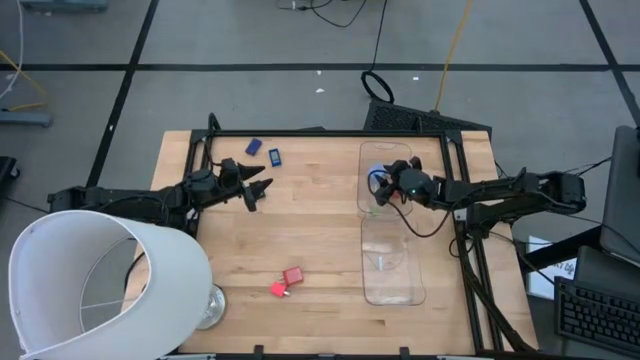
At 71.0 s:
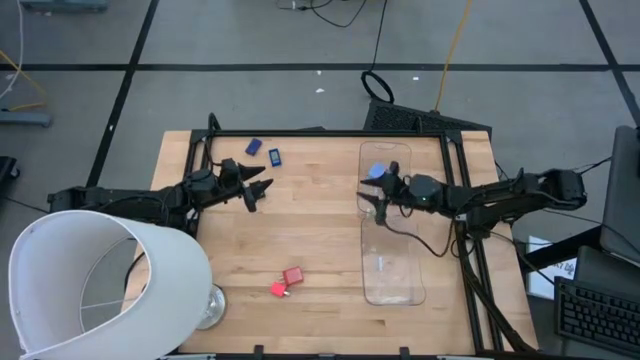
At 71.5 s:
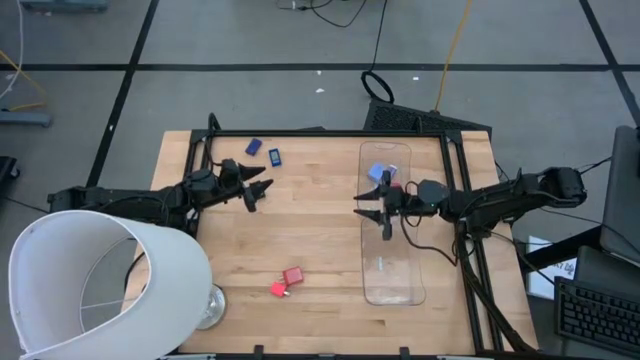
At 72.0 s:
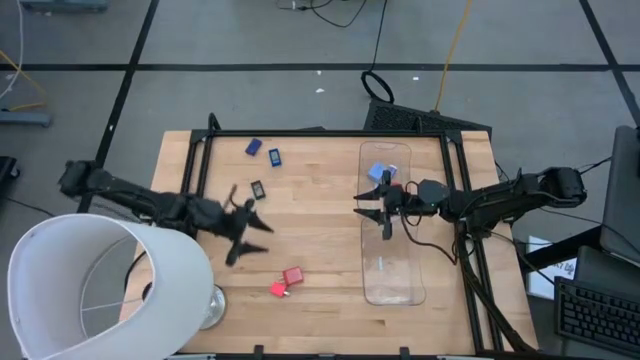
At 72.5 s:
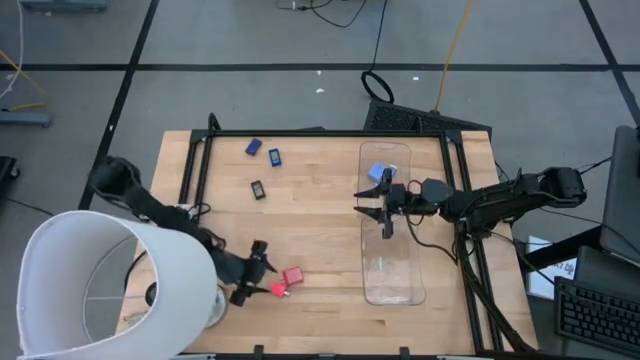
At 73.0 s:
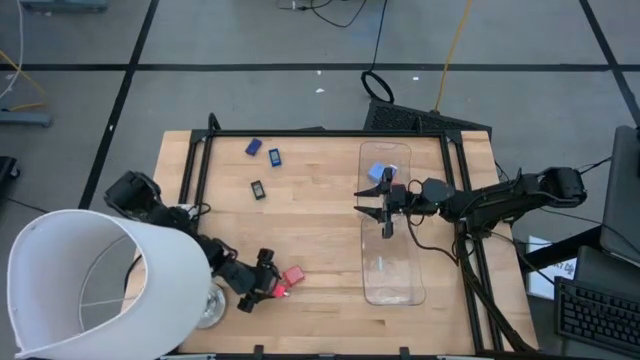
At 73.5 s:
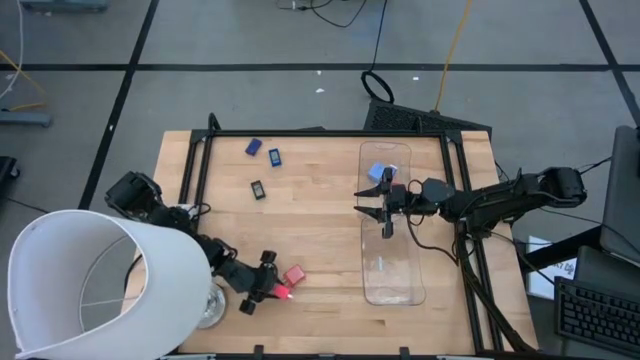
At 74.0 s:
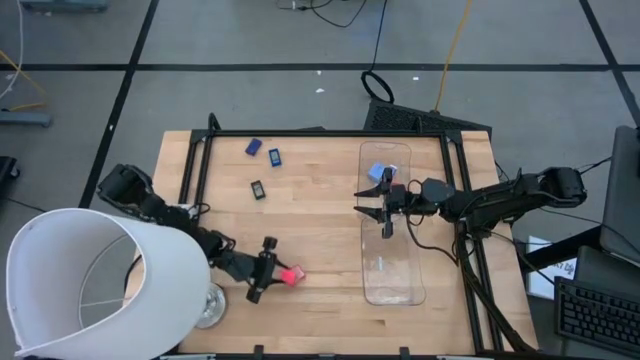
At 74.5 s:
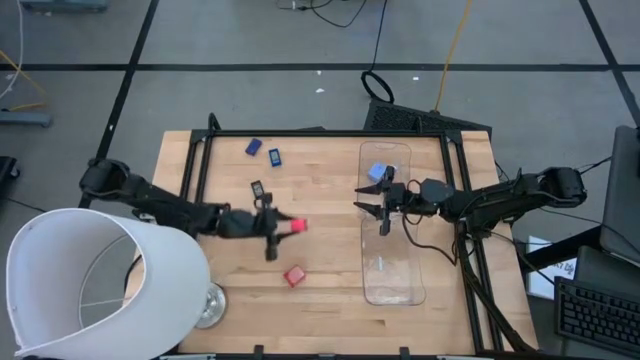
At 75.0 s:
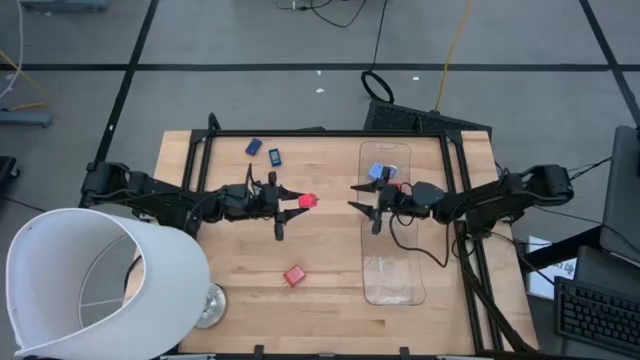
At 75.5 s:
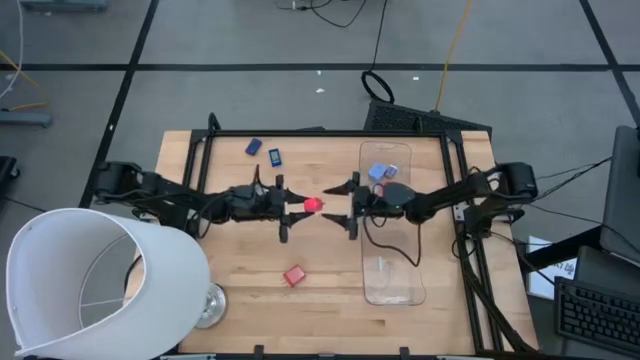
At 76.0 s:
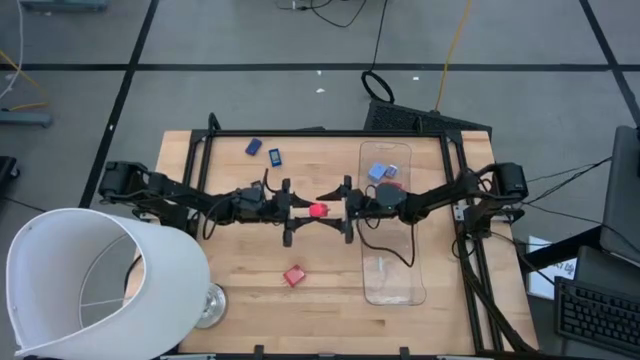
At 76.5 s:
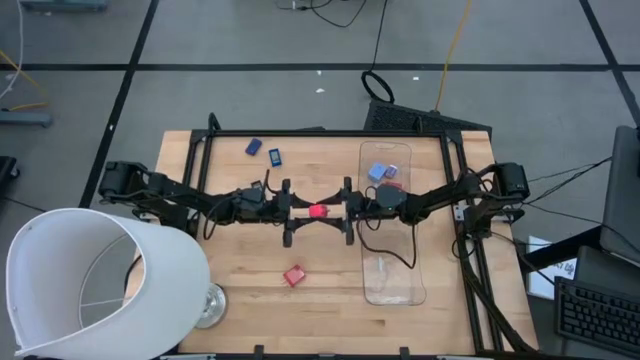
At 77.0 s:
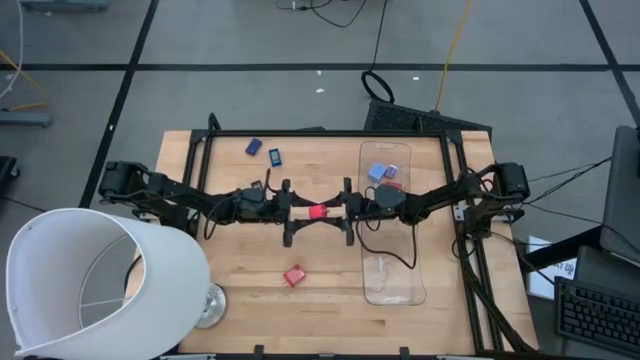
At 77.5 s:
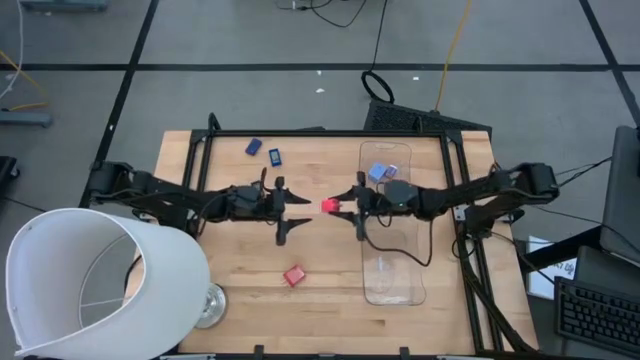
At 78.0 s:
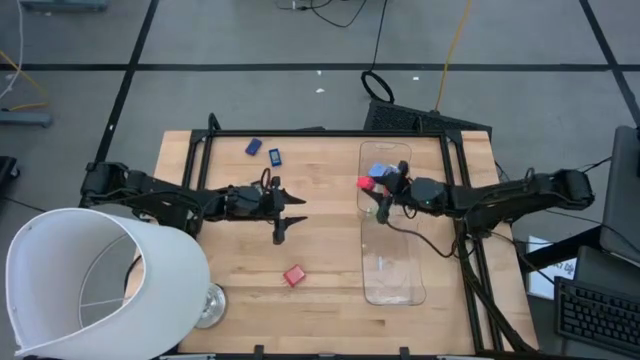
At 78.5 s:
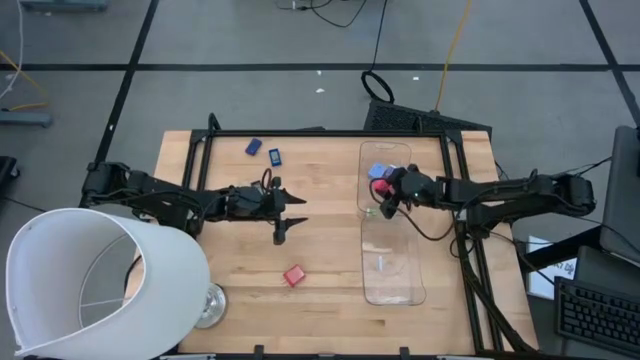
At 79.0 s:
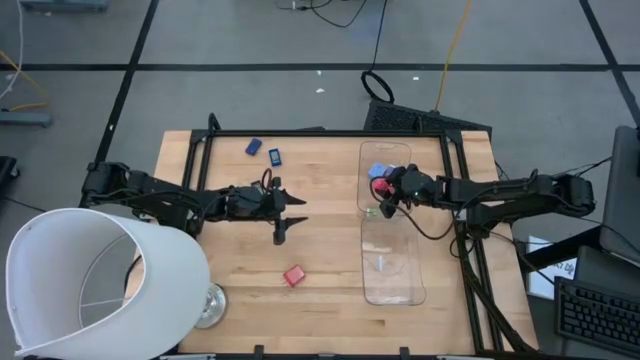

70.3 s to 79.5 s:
Task: Pick & Place Office items
Put the pink charger adapter into the top transparent bin

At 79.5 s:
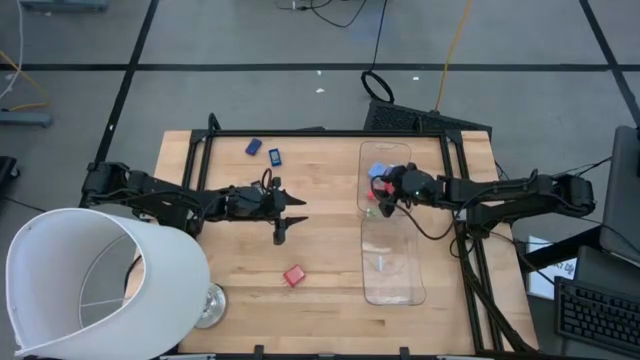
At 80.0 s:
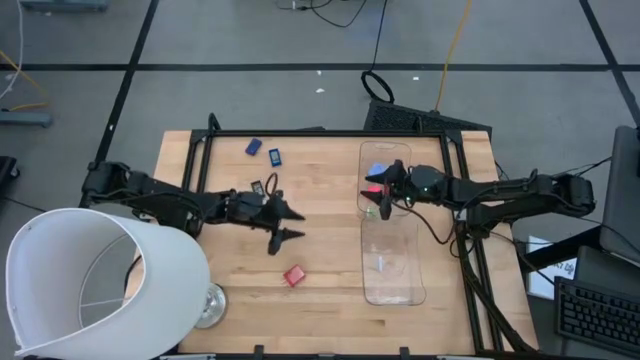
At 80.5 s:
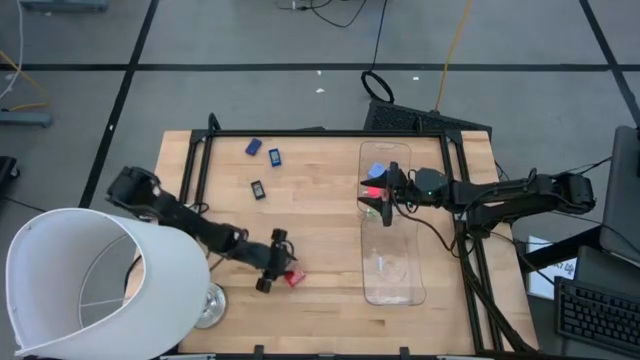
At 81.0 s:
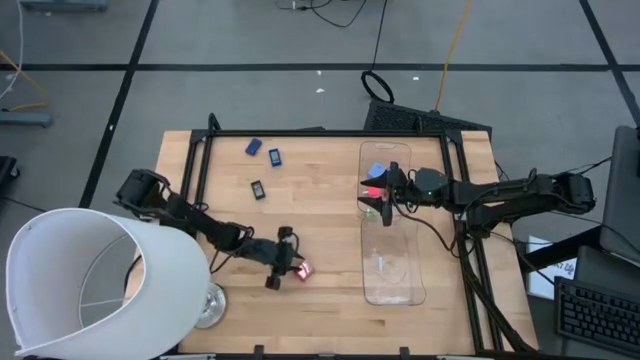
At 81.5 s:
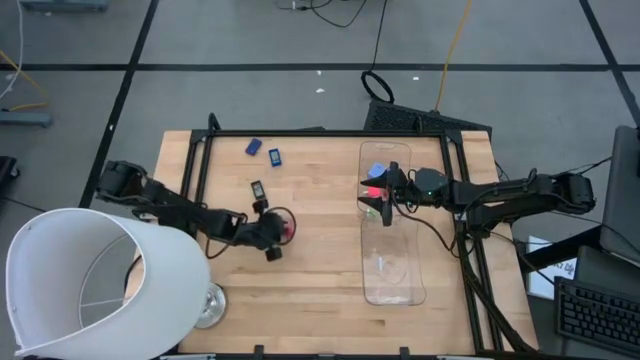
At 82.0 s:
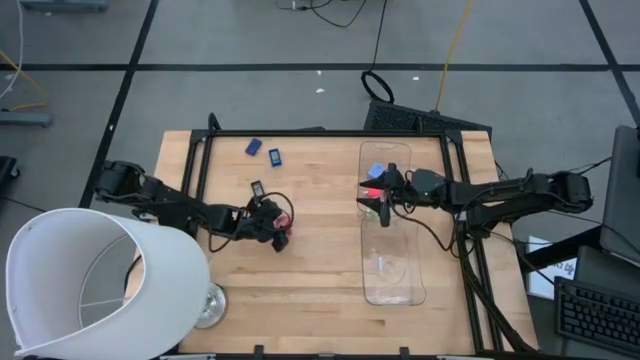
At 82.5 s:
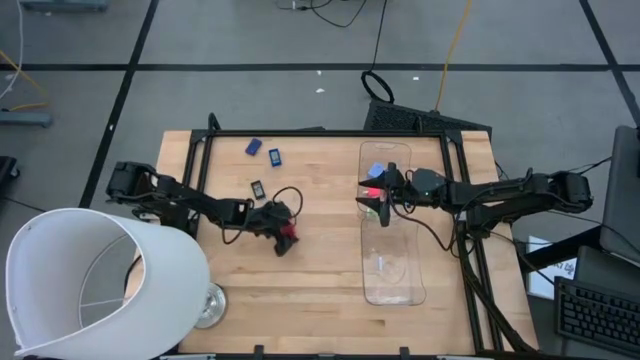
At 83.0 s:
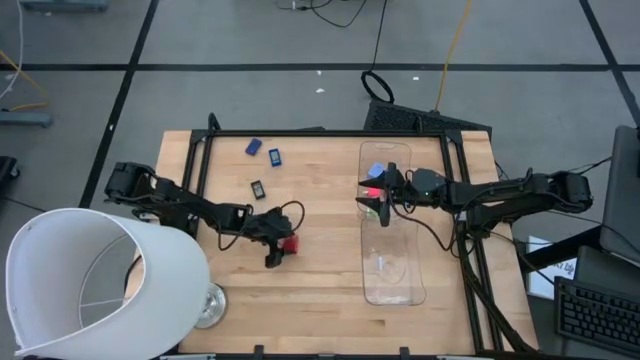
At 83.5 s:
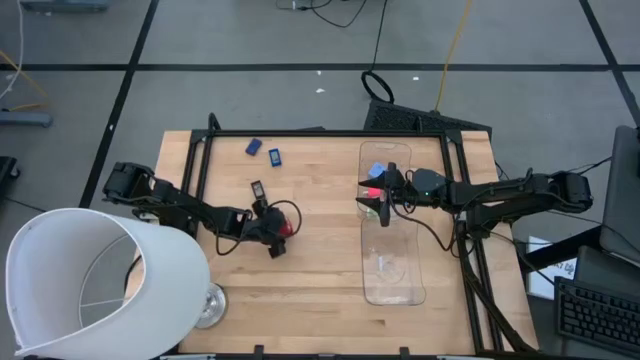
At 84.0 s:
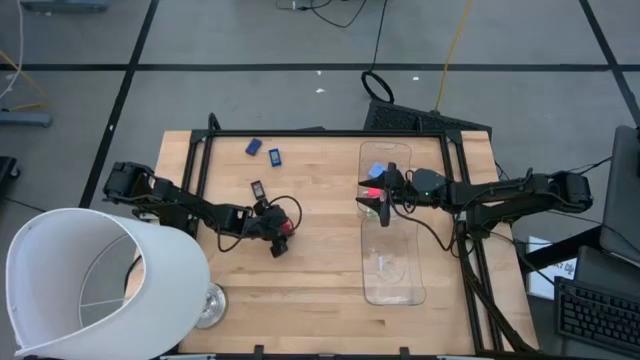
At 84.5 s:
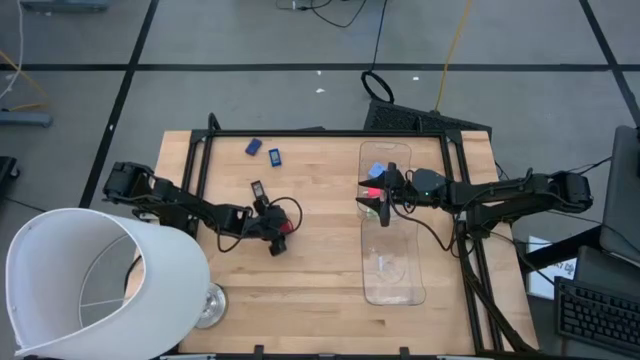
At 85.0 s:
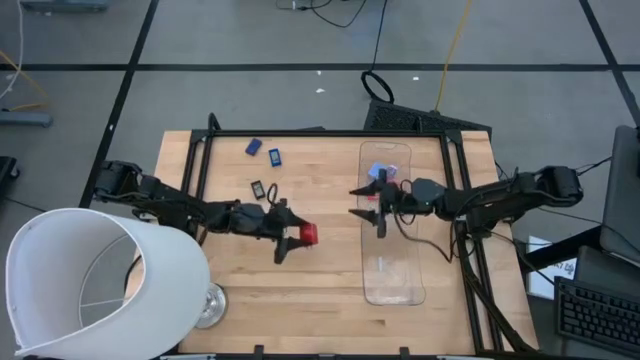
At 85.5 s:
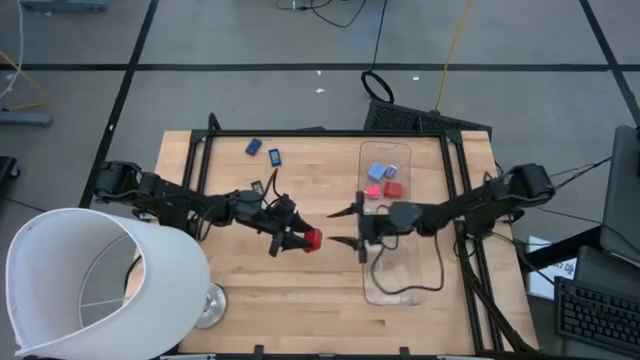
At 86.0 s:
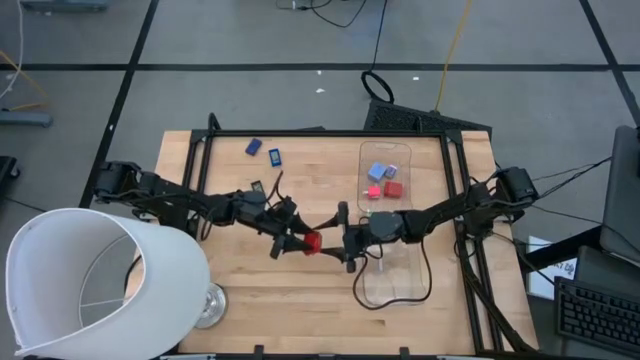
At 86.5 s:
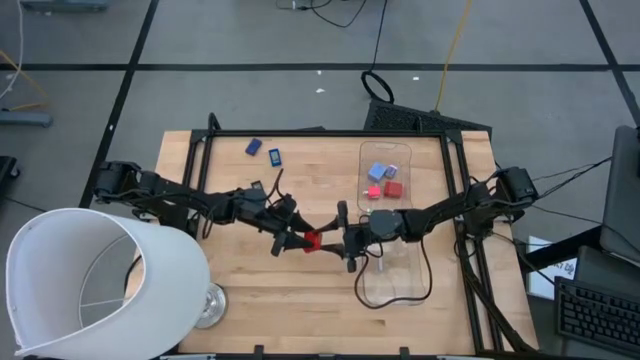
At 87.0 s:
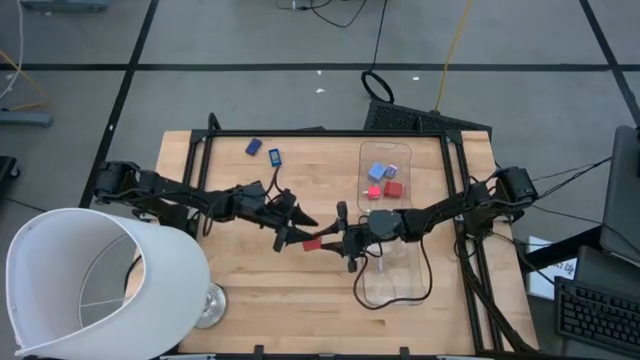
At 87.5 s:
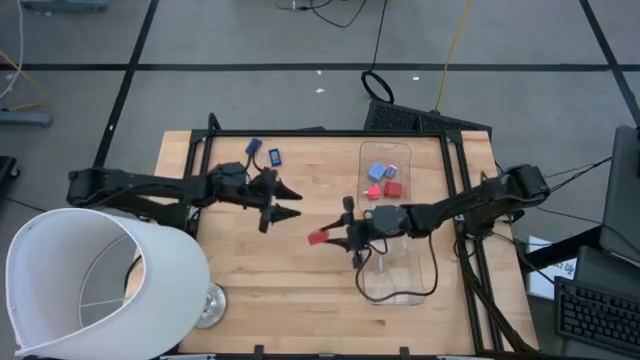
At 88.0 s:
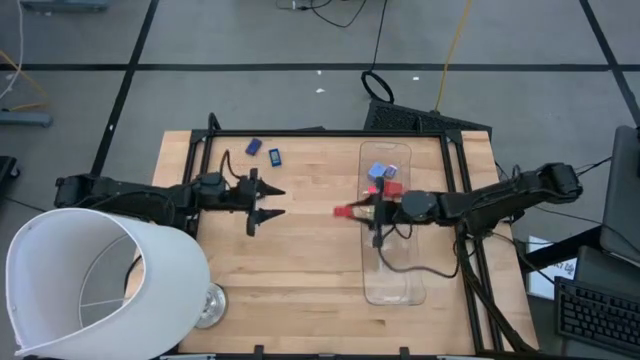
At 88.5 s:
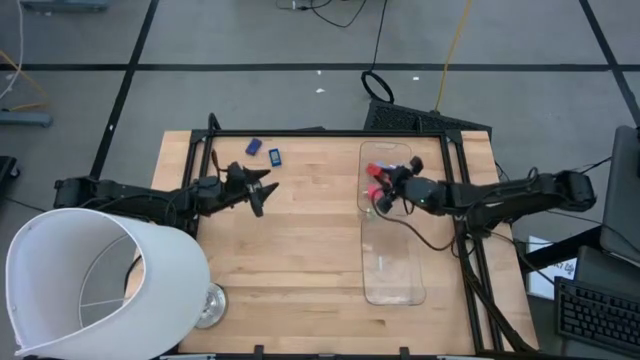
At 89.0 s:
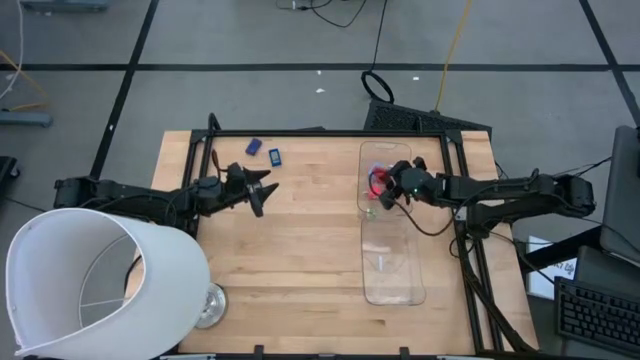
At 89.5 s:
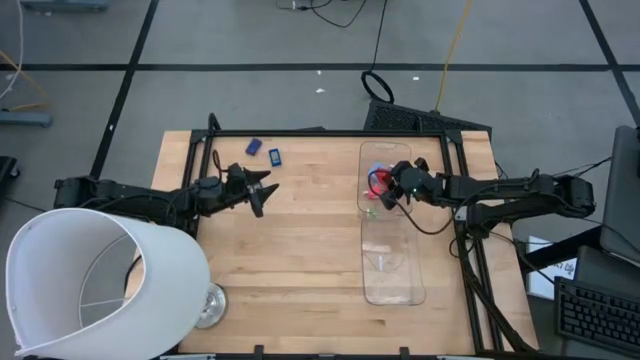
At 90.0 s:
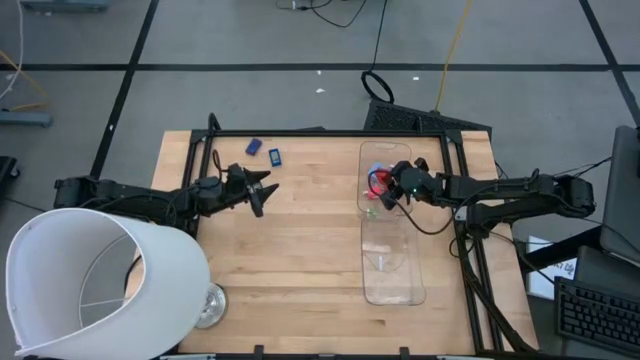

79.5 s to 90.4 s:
Put the red charger adapter into the top transparent bin

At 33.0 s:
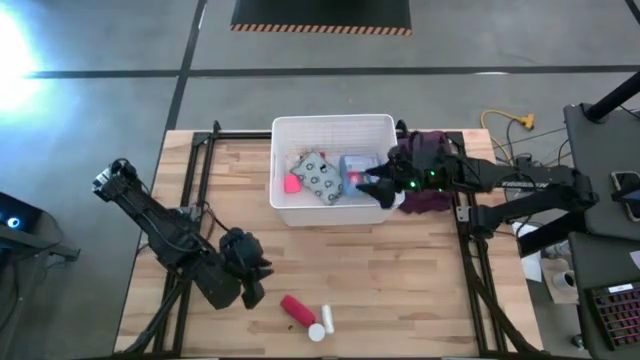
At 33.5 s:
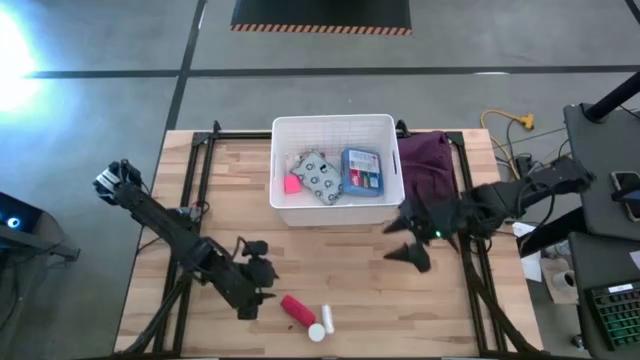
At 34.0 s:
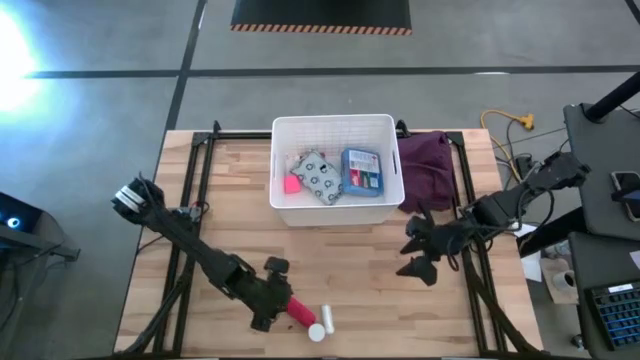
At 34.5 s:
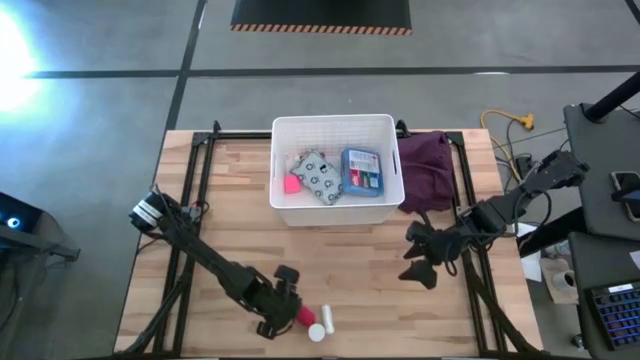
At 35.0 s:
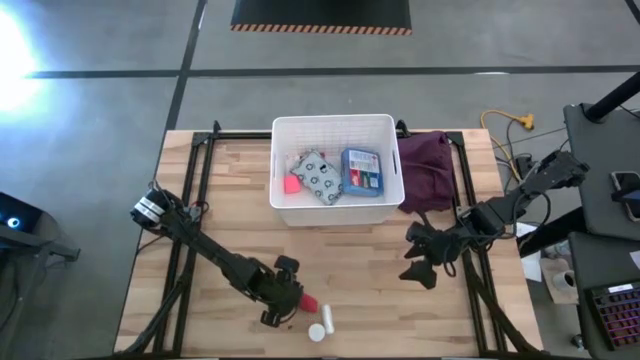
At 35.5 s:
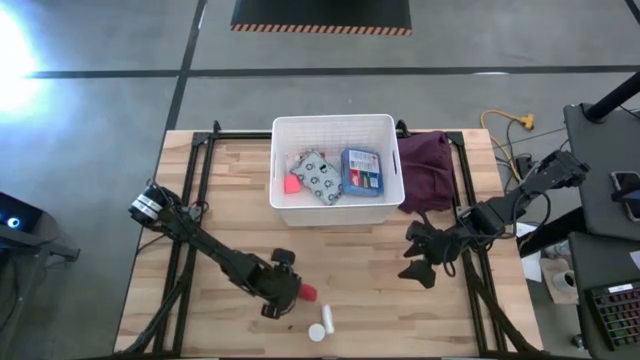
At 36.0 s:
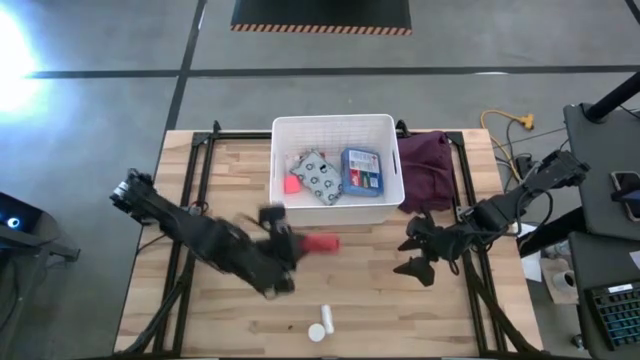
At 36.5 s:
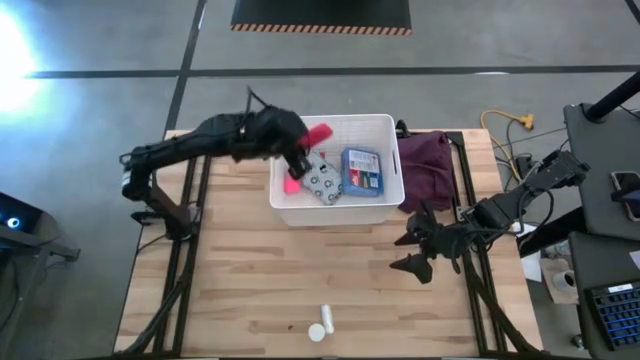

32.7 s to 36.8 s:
Task: Pick & place medical supplies in basket/bin
Put the red bandage into the white bin
